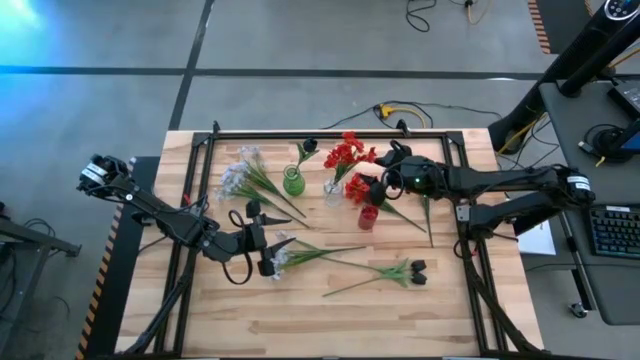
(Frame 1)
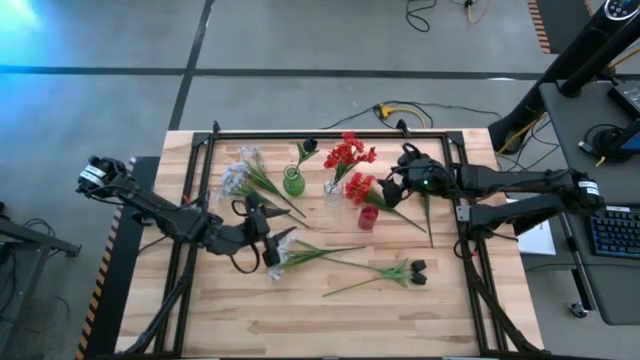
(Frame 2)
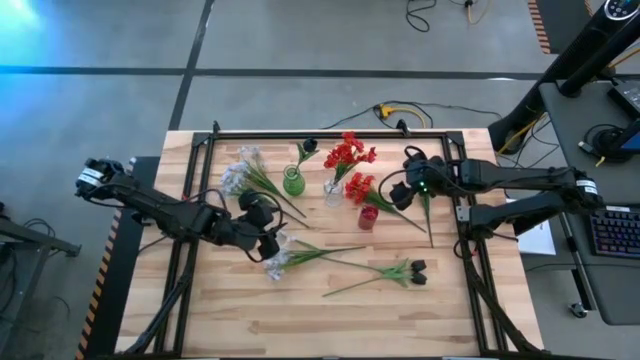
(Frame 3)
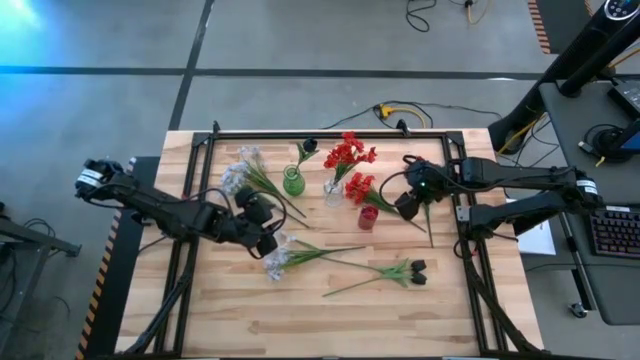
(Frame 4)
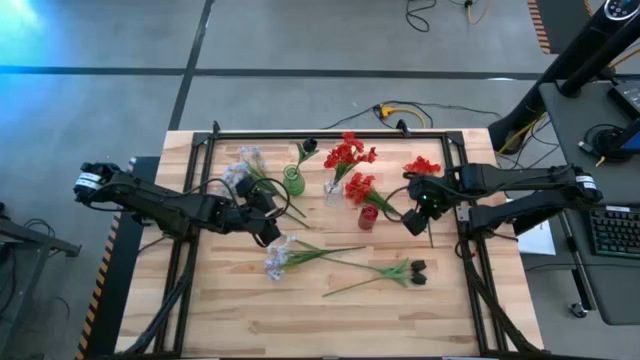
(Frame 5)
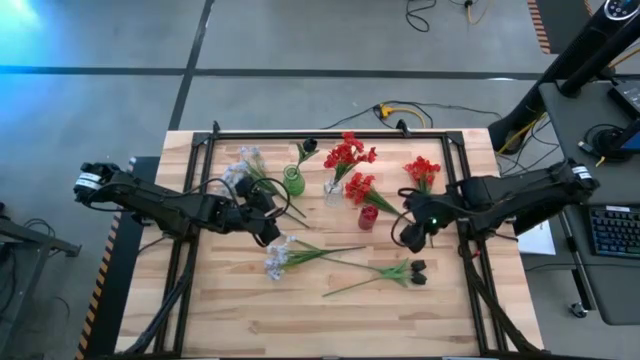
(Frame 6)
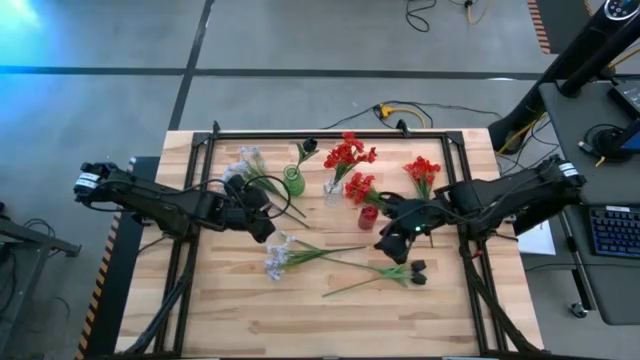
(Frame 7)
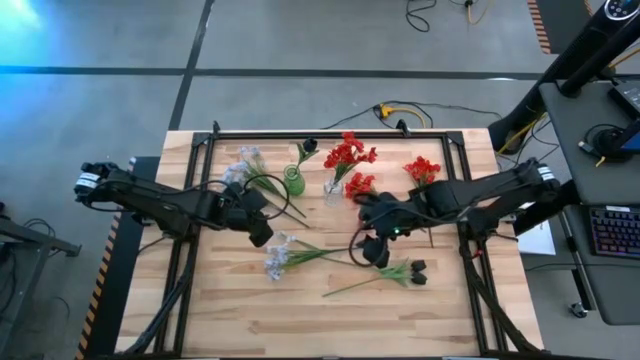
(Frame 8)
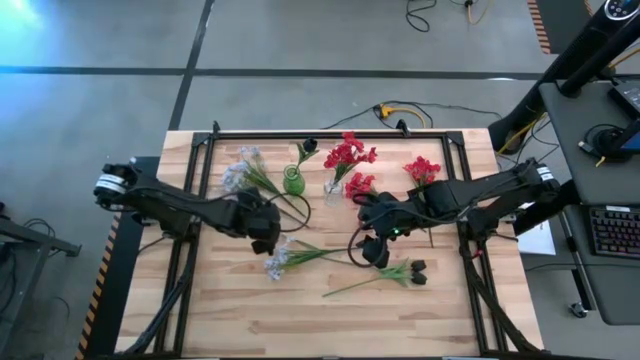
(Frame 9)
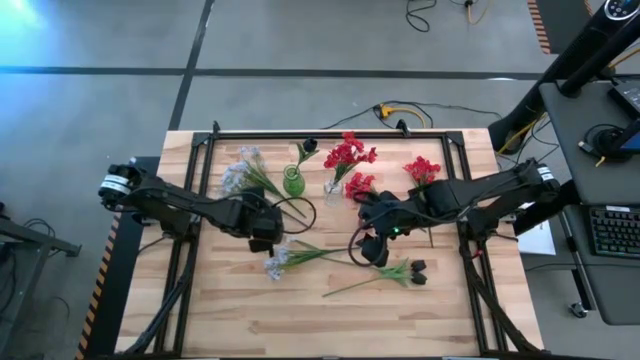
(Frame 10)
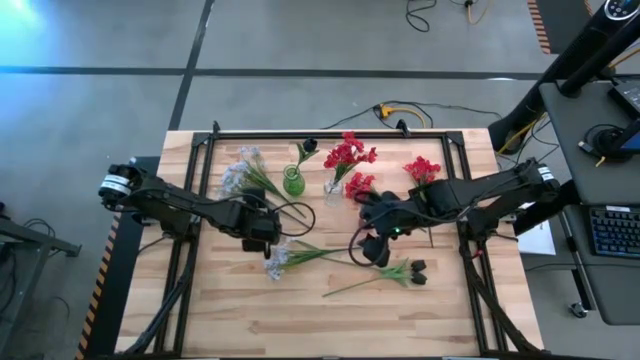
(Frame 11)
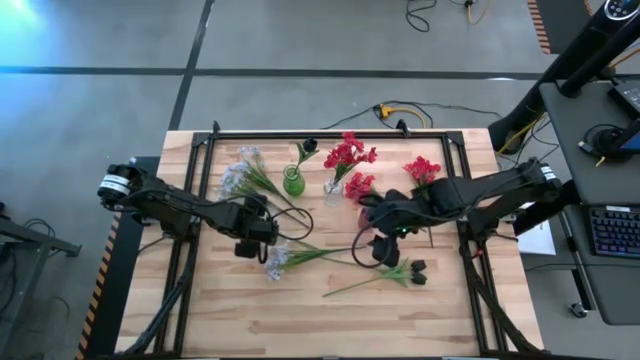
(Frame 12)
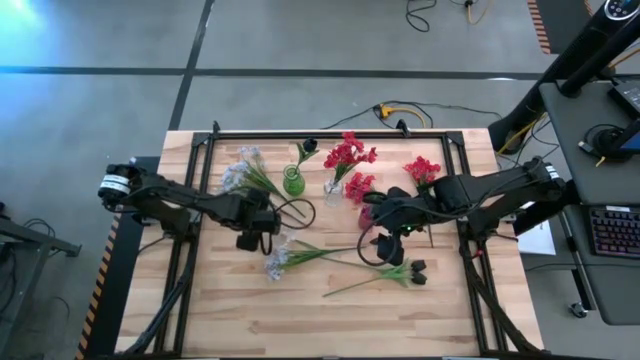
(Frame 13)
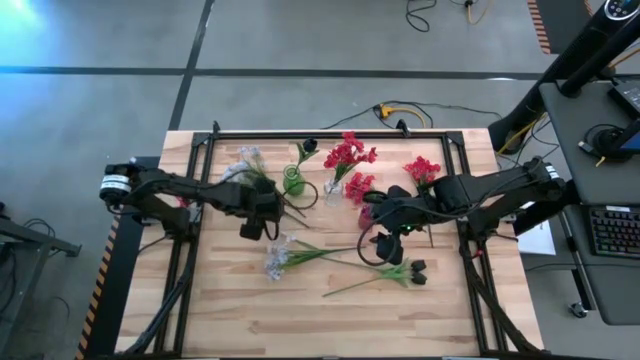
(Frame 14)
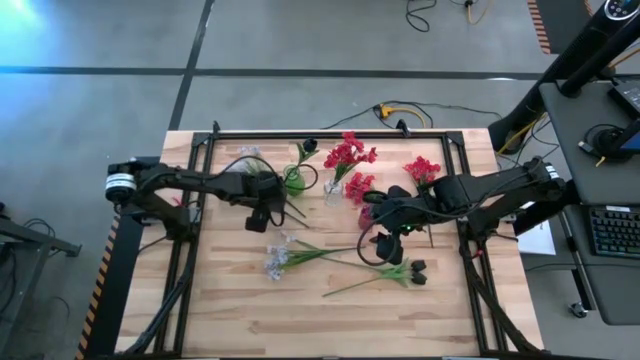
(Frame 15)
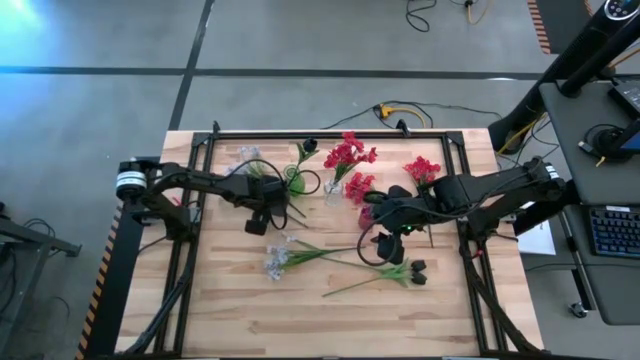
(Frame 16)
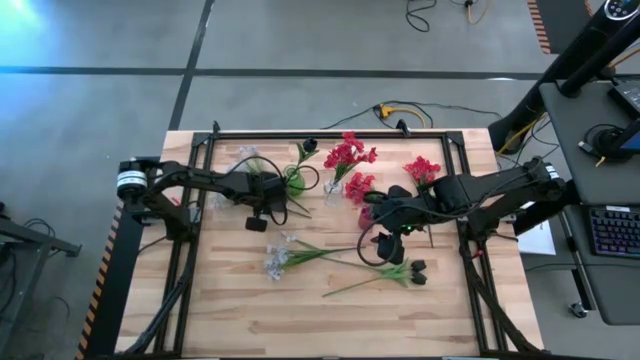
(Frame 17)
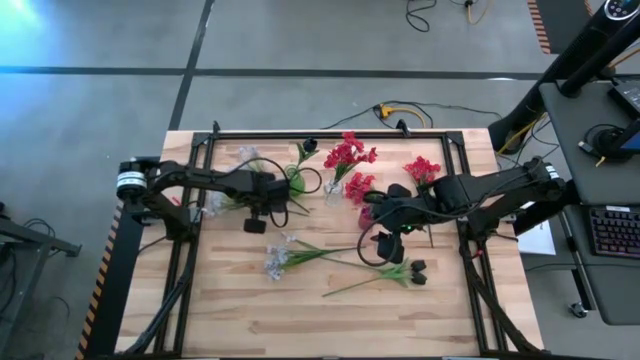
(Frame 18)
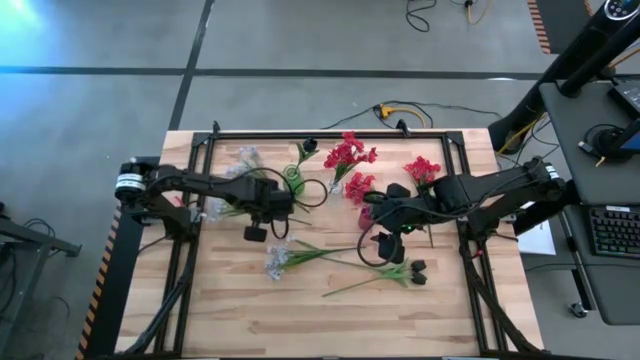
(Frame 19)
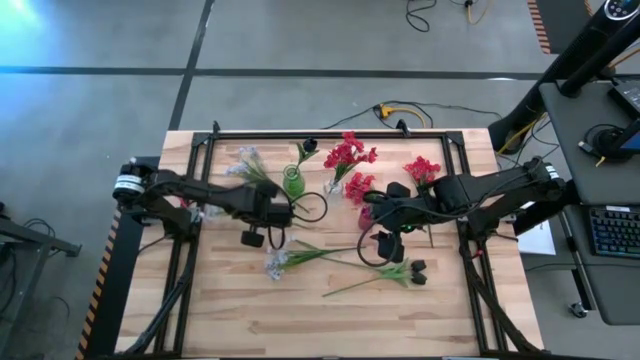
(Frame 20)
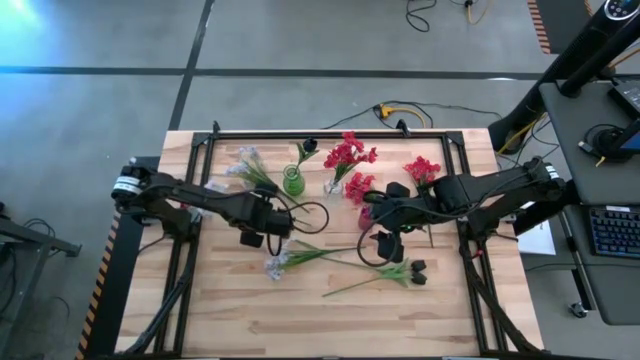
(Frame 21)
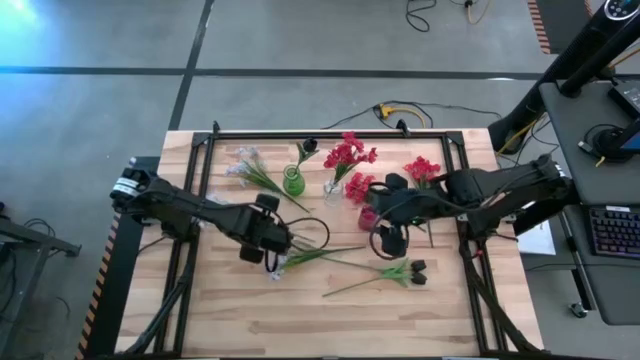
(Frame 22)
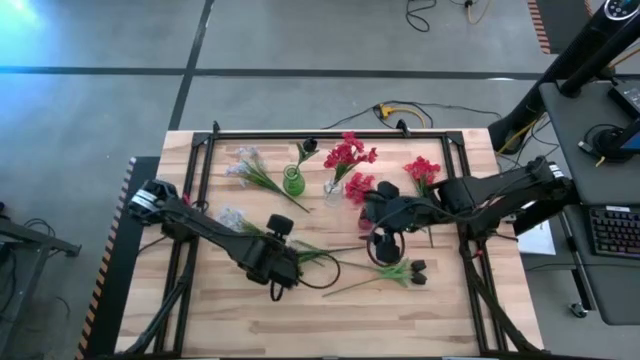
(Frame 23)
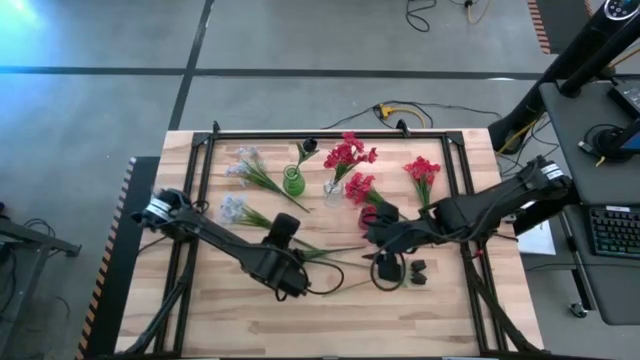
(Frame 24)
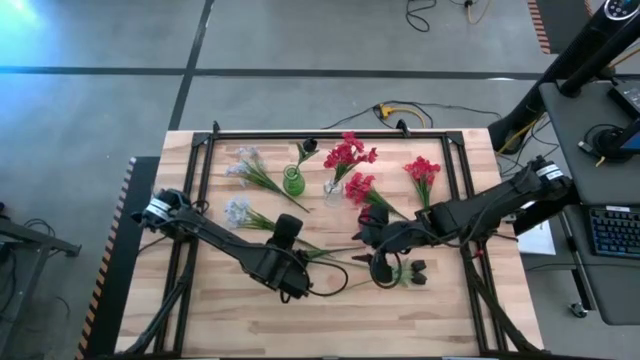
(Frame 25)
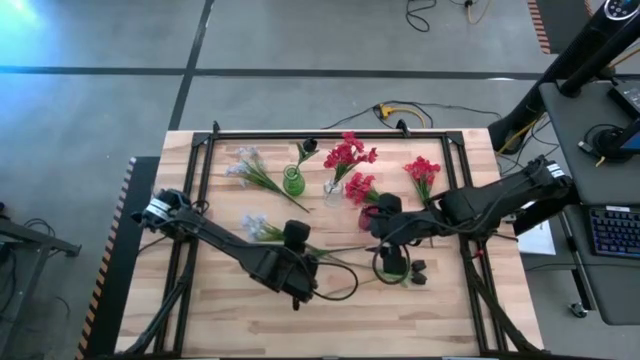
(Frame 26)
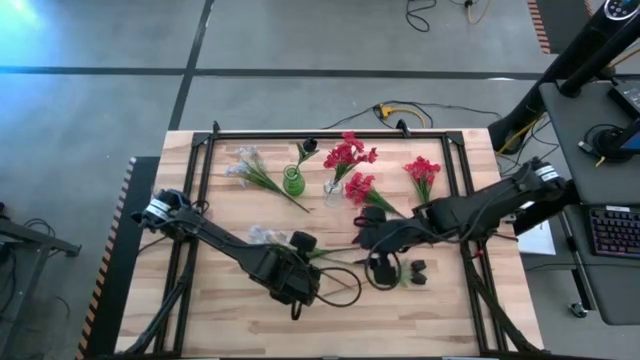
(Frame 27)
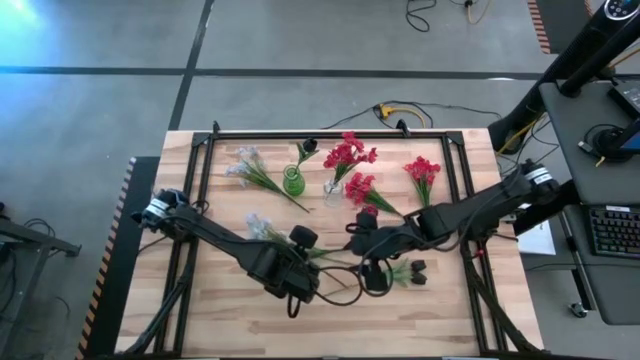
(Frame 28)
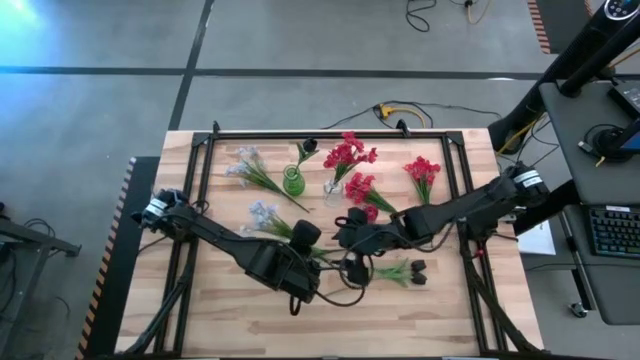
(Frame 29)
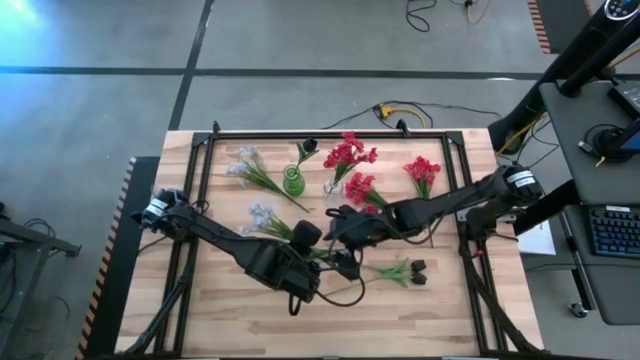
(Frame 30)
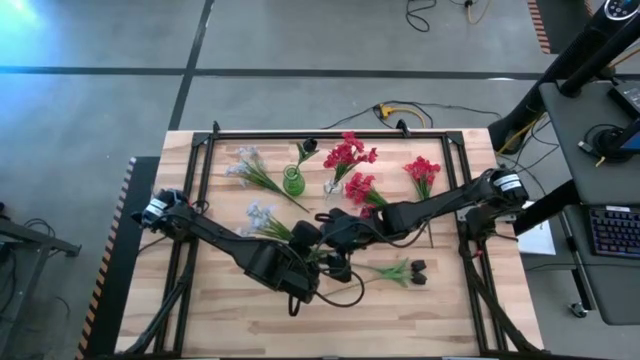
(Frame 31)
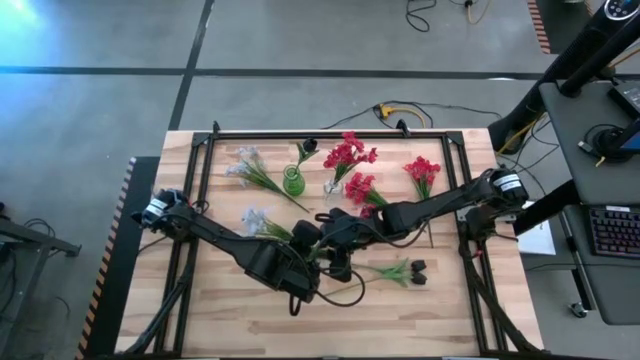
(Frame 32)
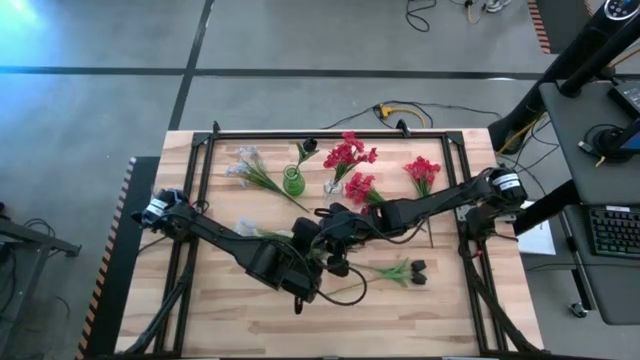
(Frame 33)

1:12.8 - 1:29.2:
Task: Sort flowers into vase by color
Put the middle left white flowers into the red vase

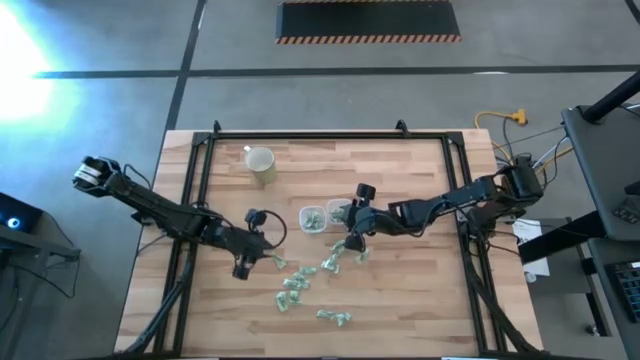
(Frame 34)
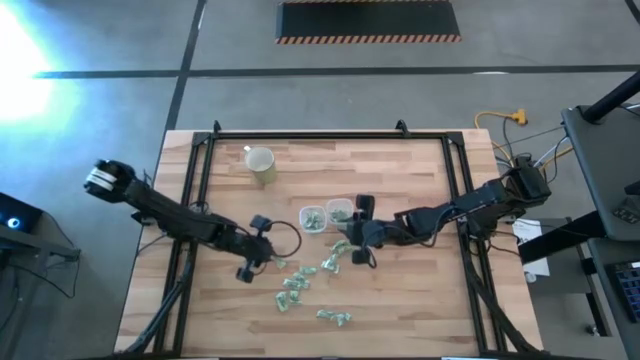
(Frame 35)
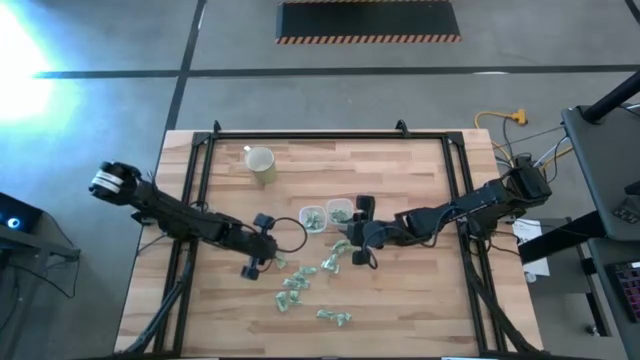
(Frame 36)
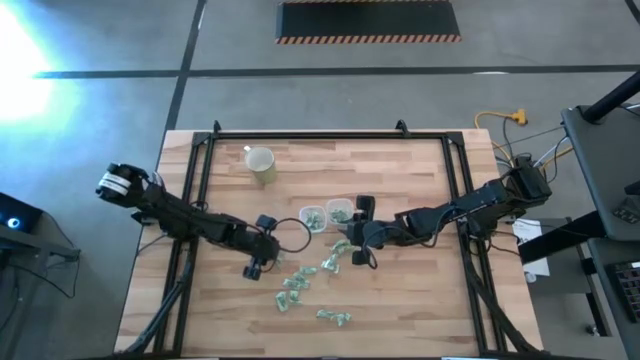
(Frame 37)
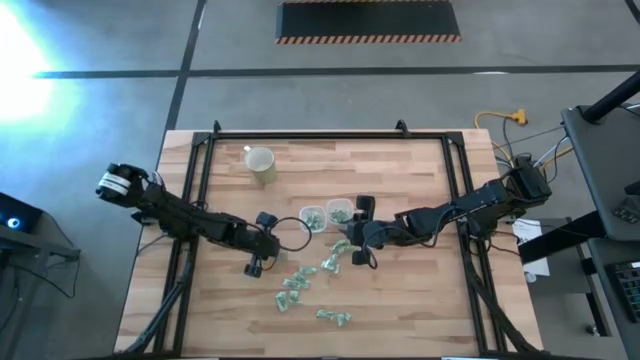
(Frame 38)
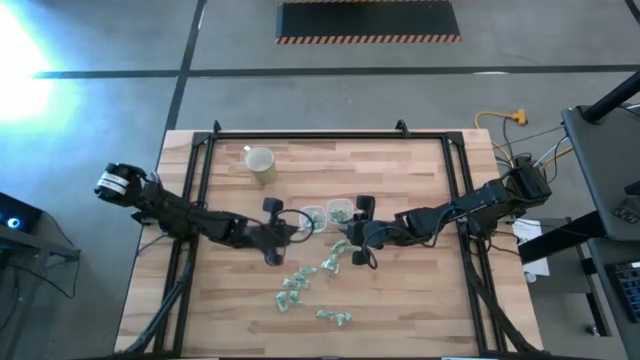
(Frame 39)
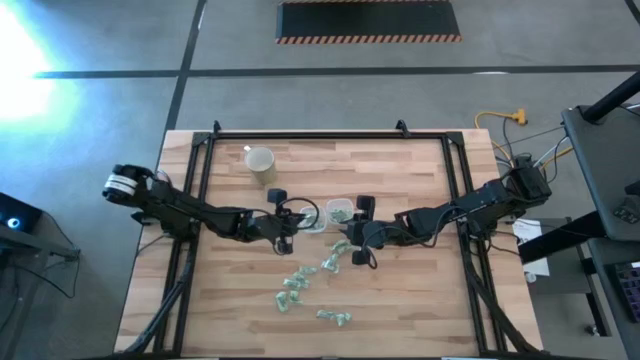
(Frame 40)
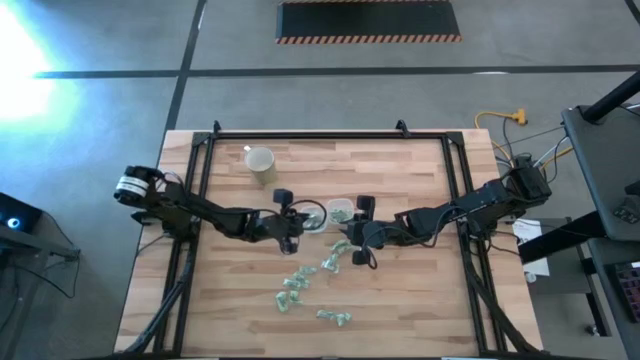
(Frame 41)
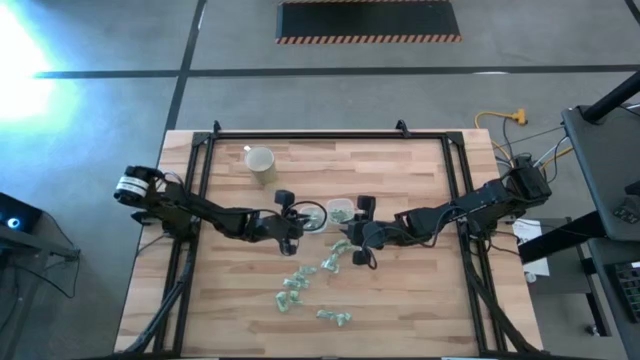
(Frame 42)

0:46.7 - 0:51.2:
Task: Pick and place items into bin
Put the stevia packet into the left transparent bin
